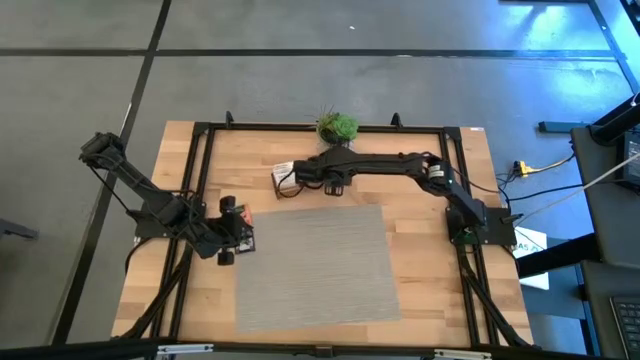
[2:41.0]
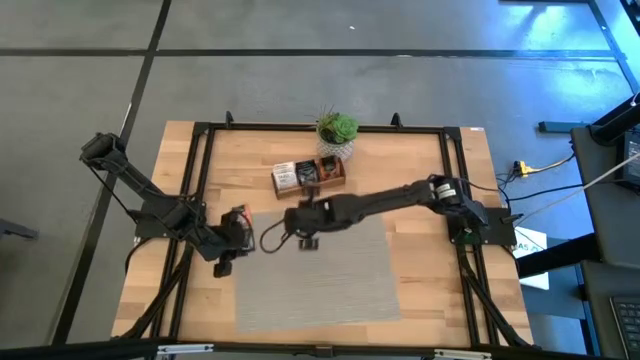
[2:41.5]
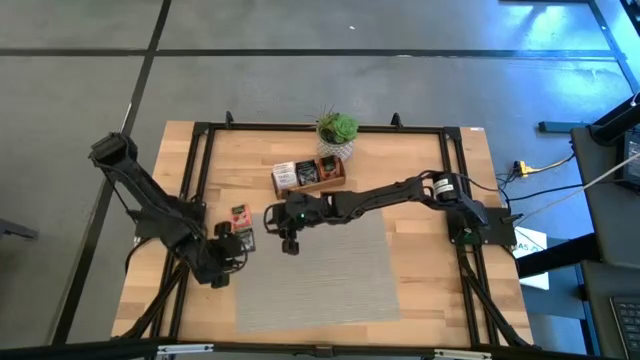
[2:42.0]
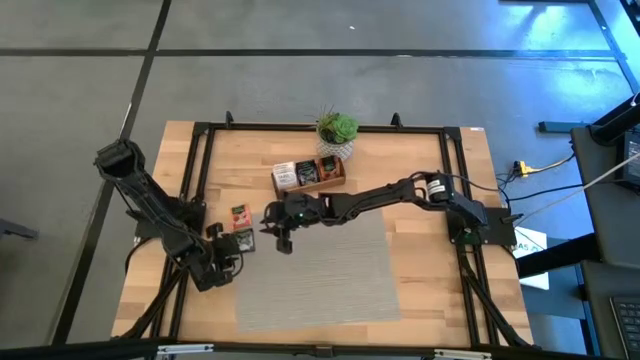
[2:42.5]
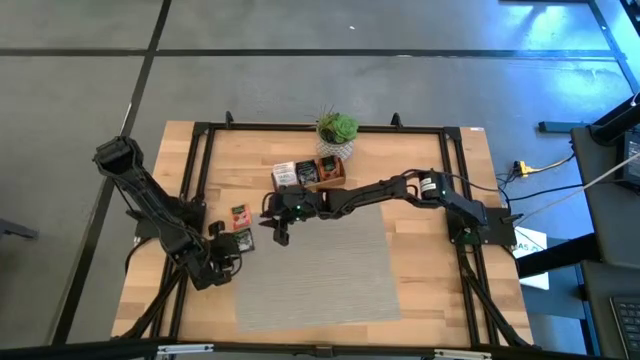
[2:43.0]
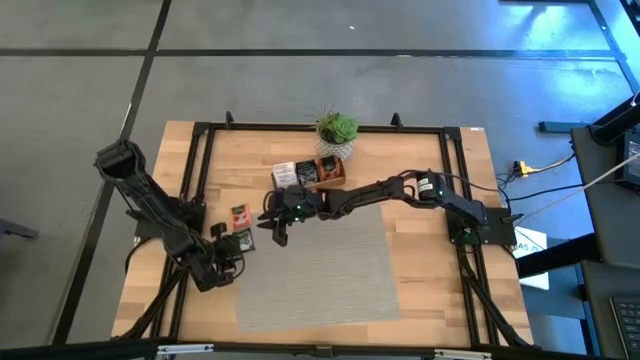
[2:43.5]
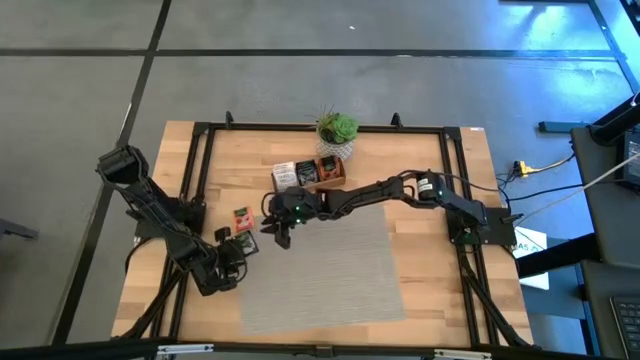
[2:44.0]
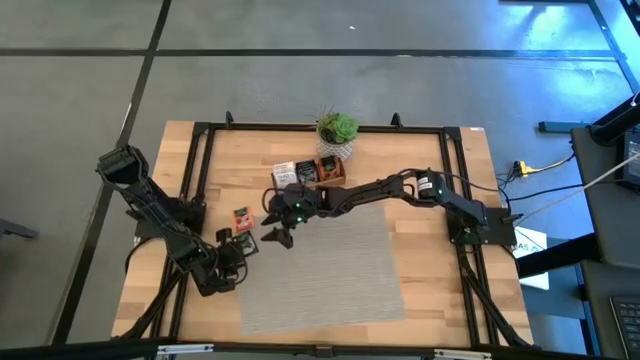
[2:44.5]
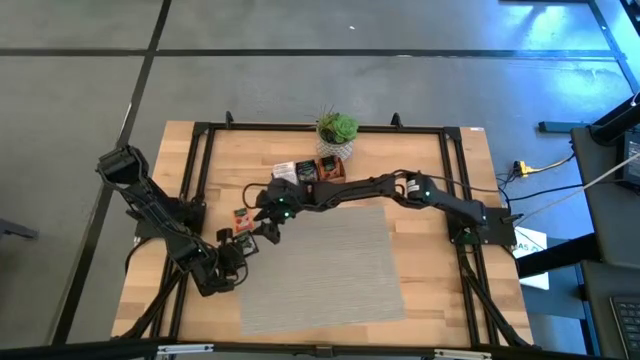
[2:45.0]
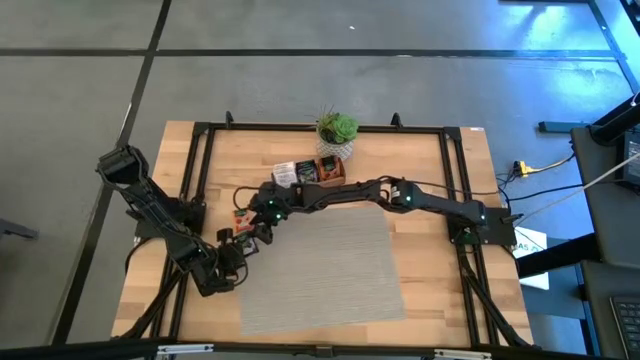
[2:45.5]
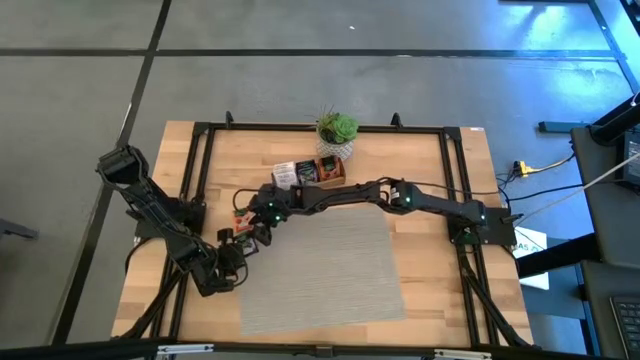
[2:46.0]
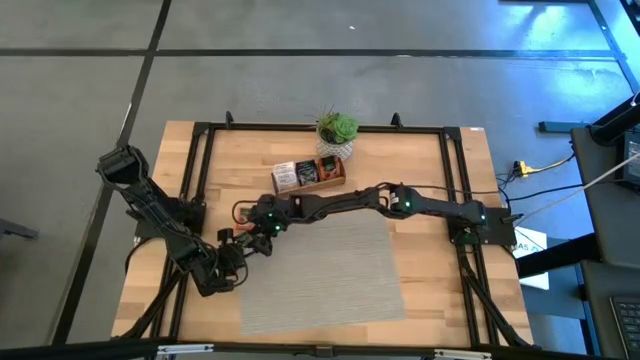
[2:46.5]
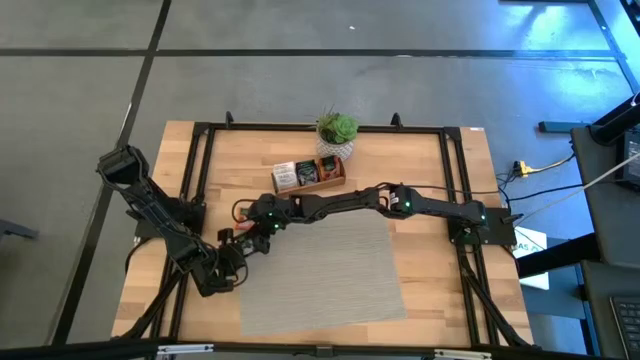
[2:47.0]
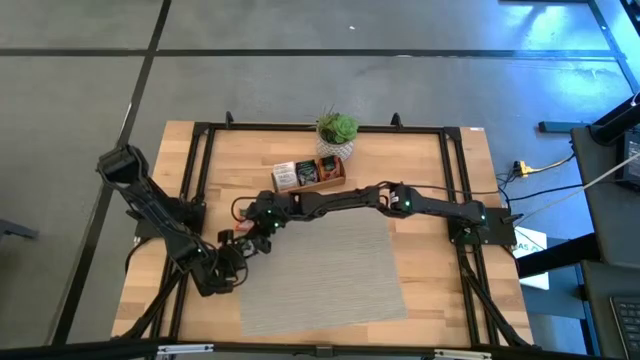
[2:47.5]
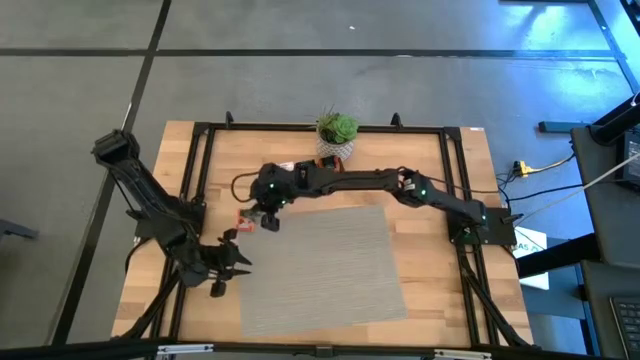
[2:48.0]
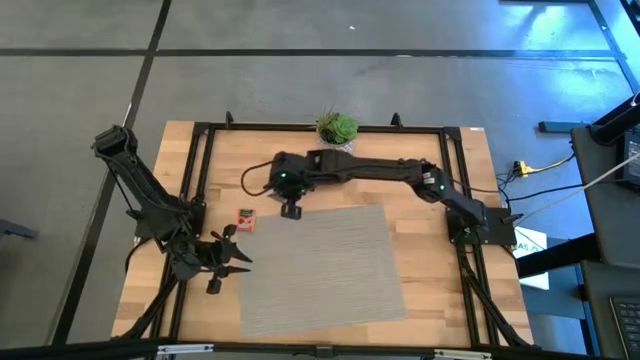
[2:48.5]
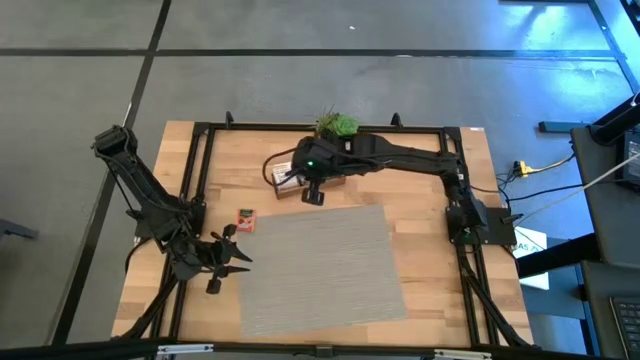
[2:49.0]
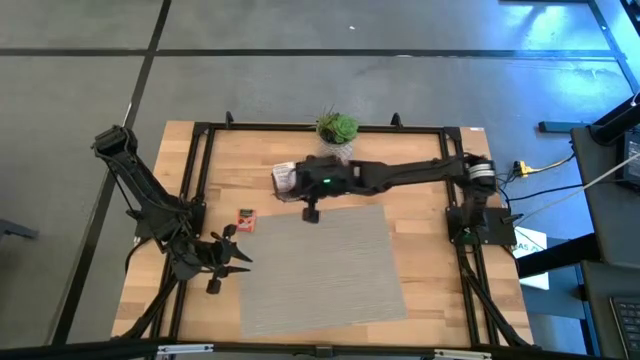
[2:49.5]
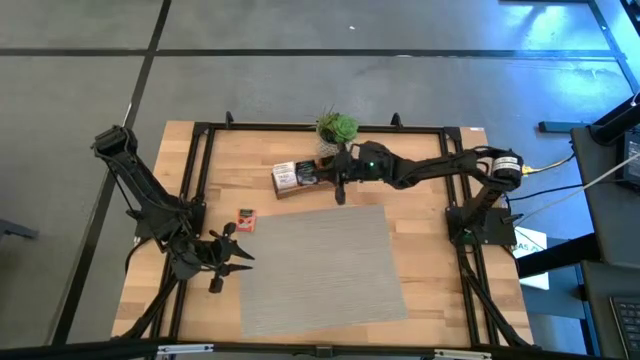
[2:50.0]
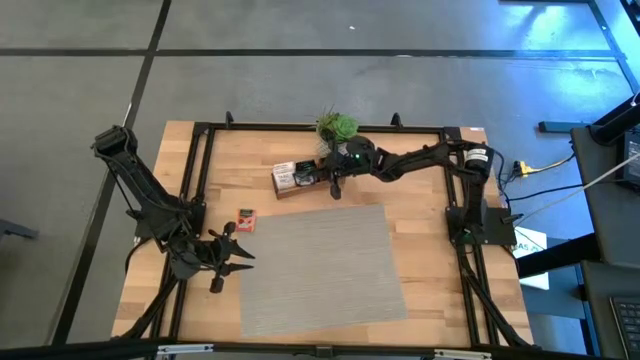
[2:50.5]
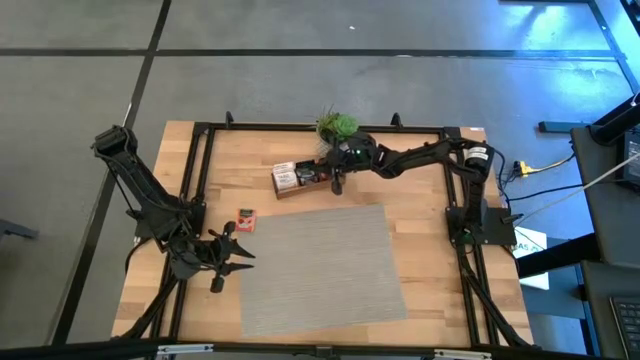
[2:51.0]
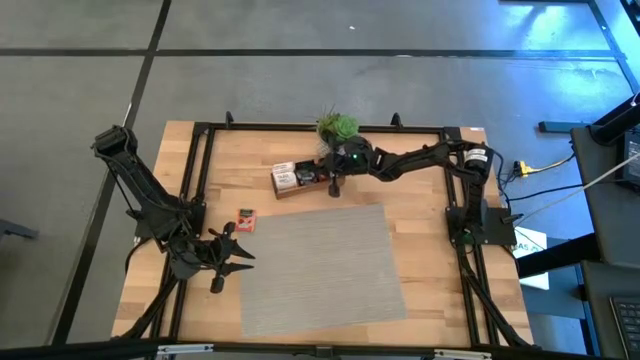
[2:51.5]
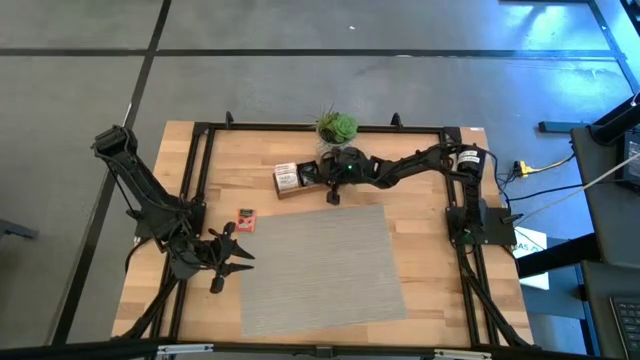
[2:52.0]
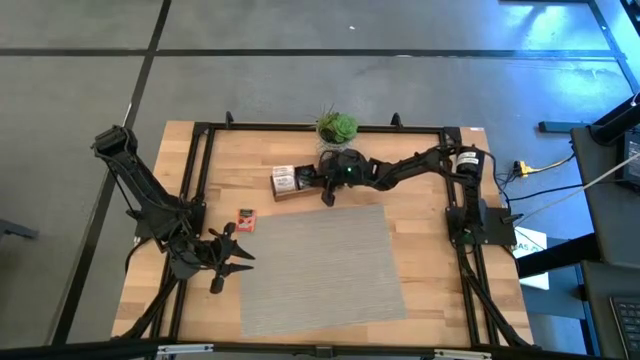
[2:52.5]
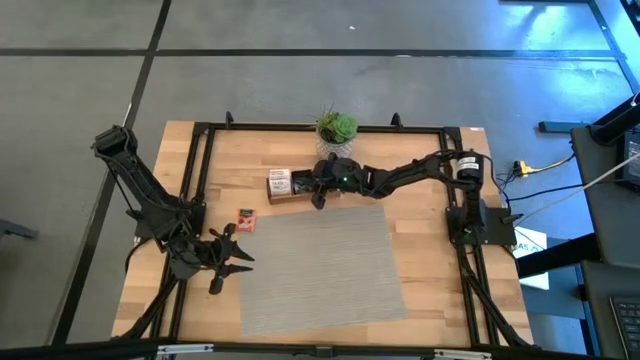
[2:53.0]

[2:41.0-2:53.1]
Task: Pick & Place Tea
Put the dark blue tea bag into the middle section of the wooden organizer

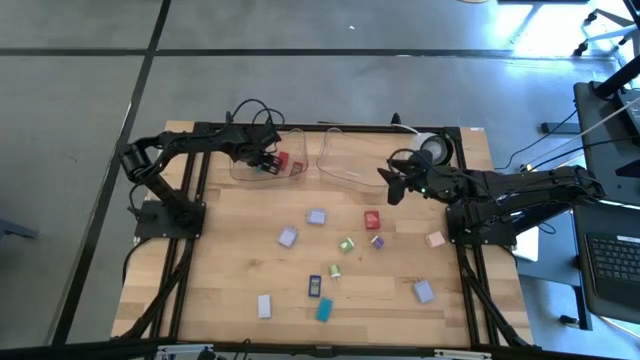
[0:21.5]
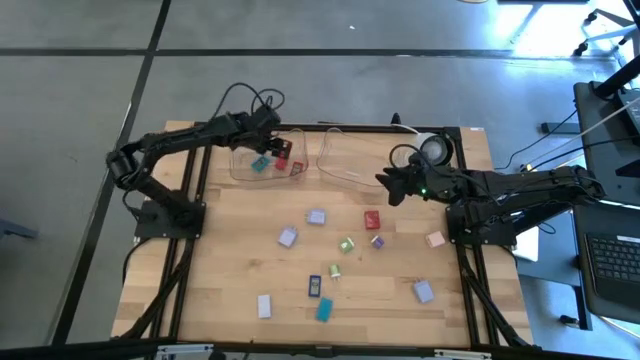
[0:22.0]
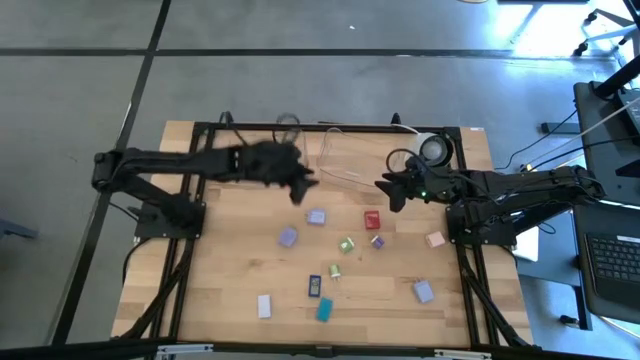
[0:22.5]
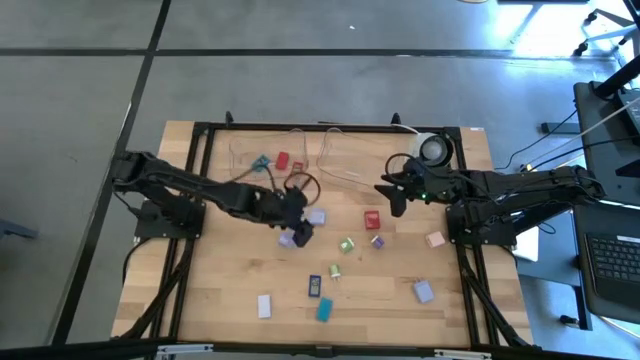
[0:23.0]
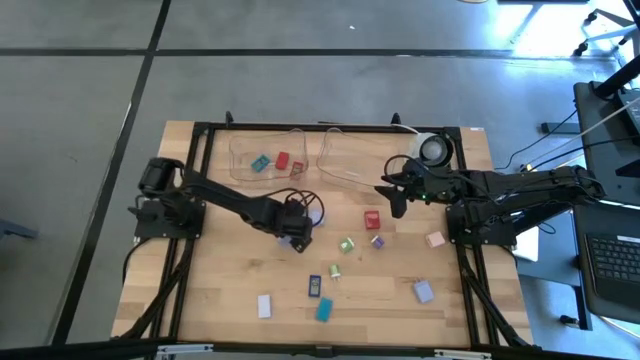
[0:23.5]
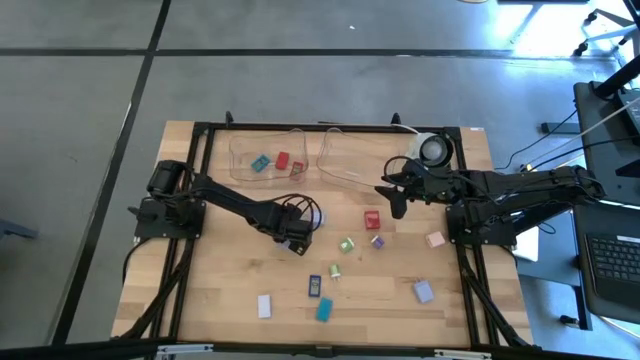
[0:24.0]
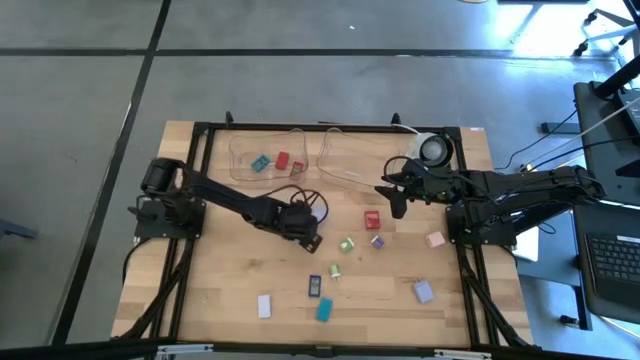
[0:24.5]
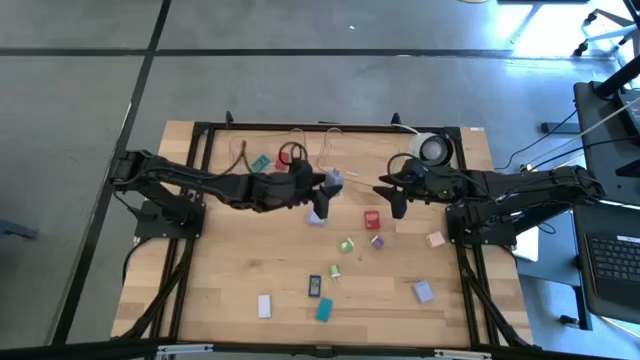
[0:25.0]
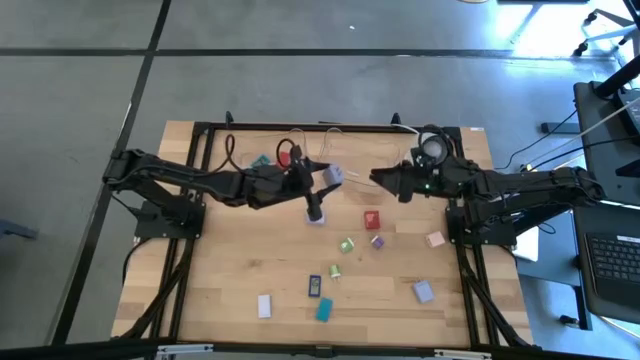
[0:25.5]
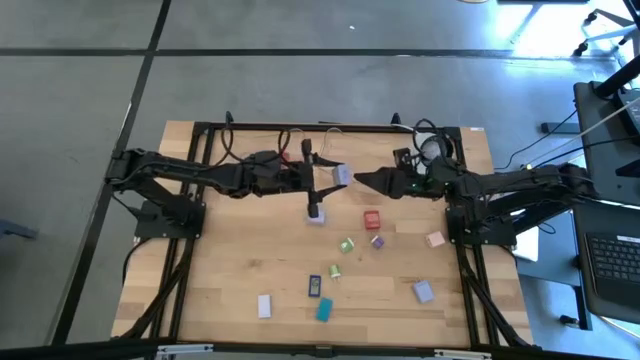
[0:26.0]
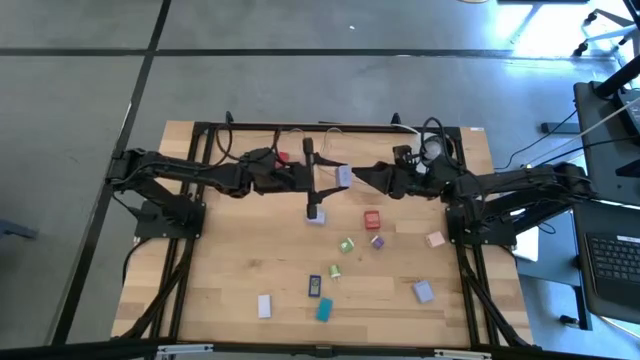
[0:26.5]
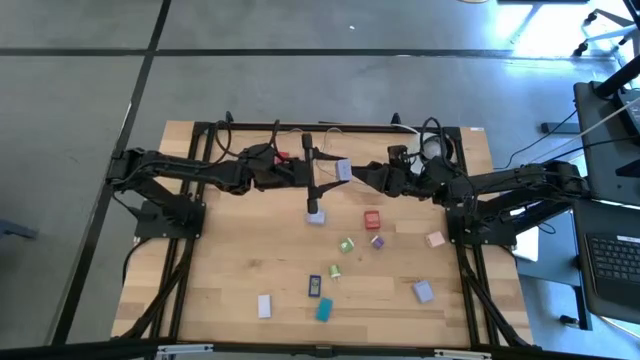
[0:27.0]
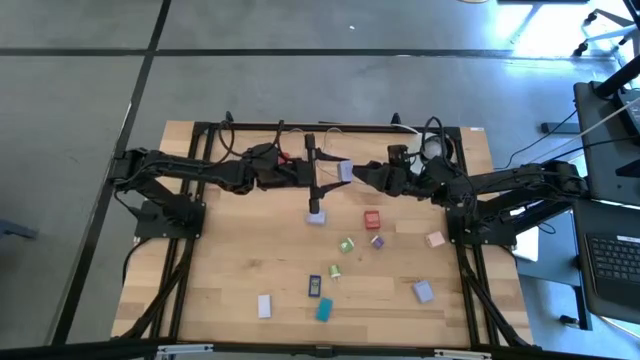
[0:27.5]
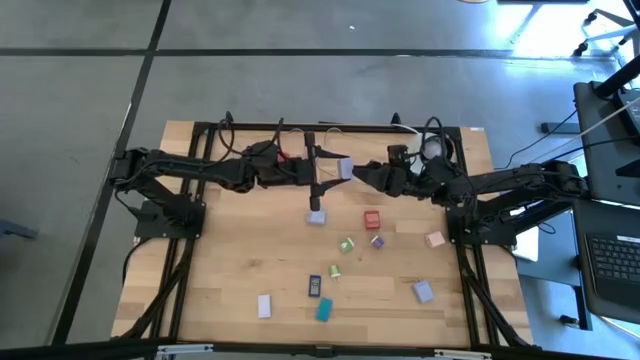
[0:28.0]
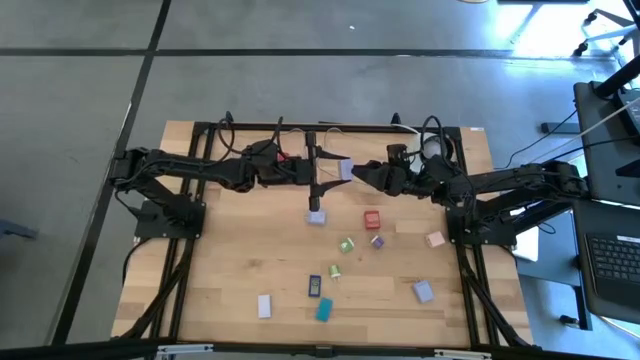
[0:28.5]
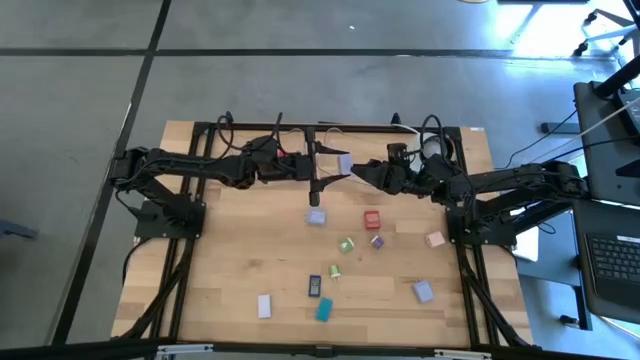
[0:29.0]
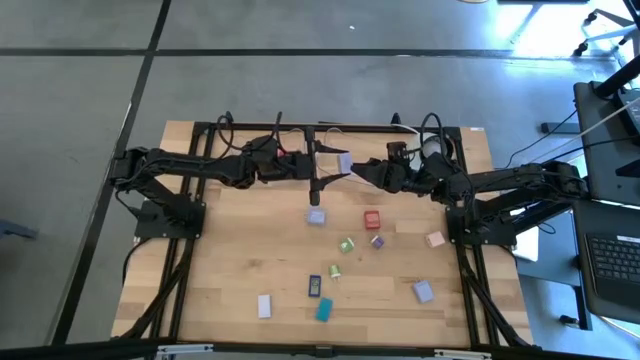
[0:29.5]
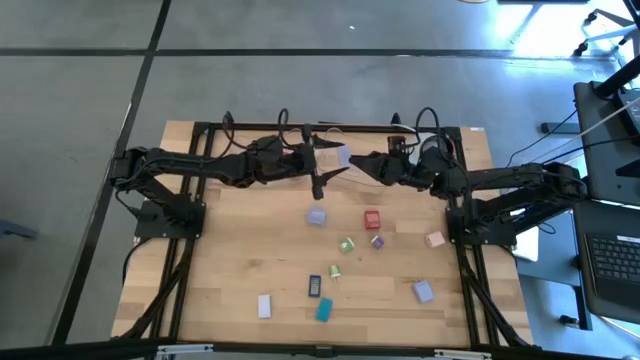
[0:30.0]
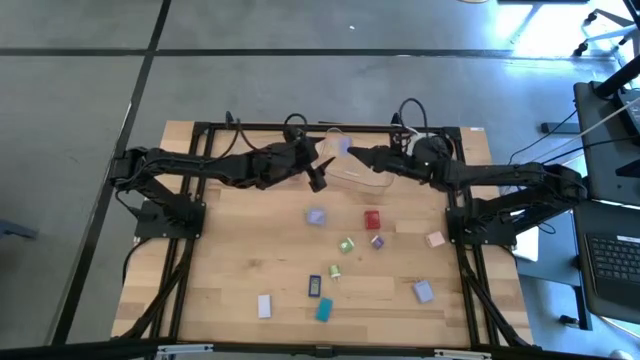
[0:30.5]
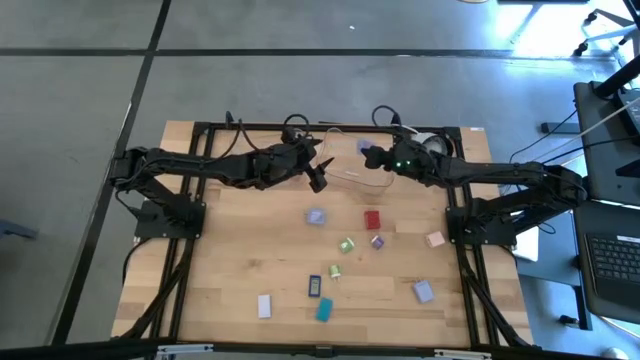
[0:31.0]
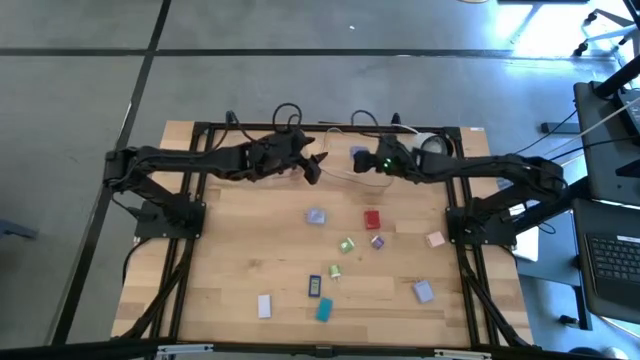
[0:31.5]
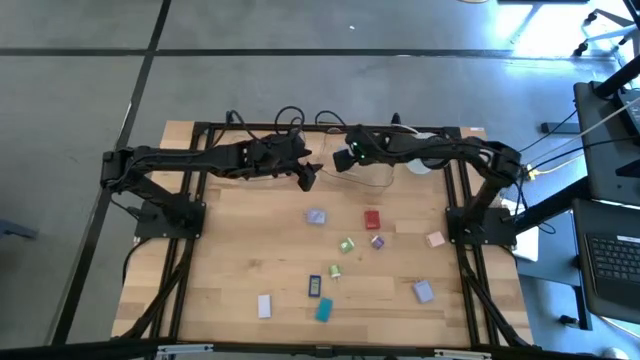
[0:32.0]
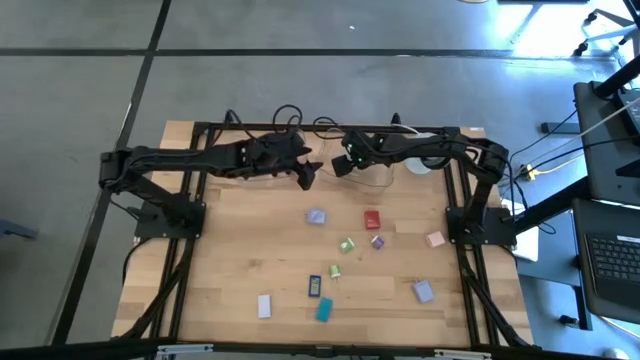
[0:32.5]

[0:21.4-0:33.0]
Task: Pick & Place Office items
Put the middle purple charger adapter into the right transparent bin
